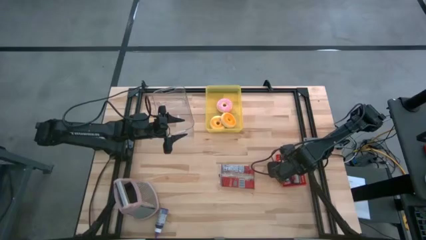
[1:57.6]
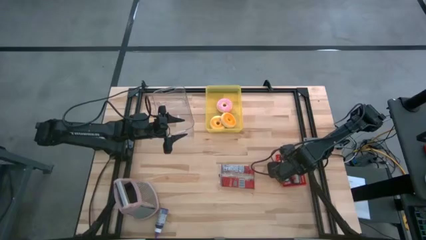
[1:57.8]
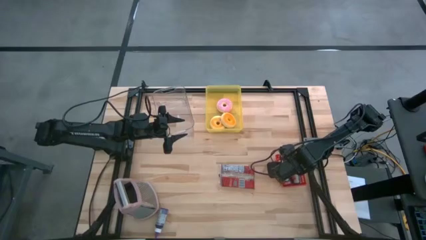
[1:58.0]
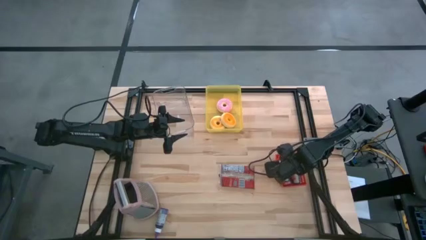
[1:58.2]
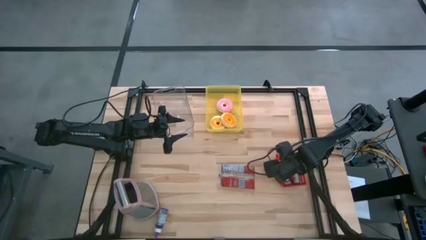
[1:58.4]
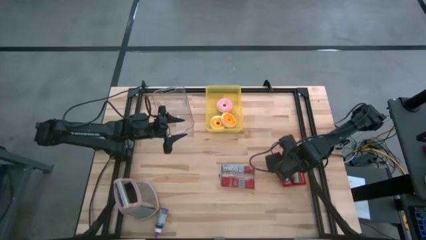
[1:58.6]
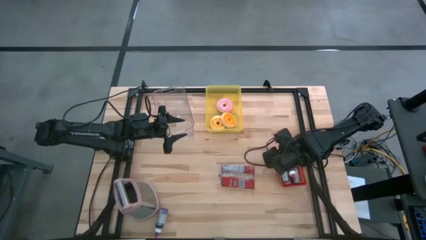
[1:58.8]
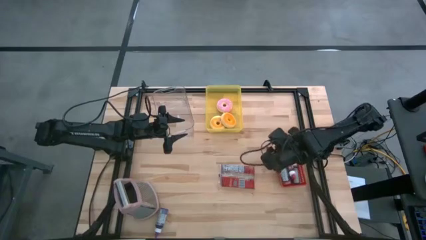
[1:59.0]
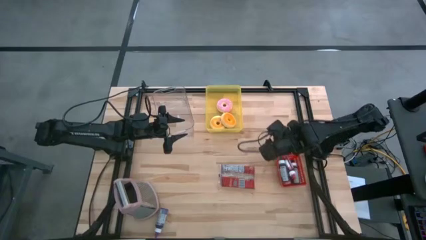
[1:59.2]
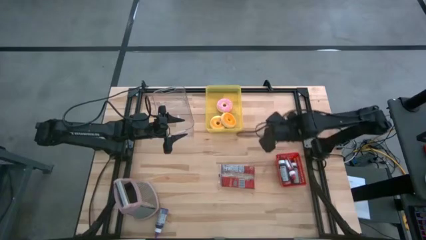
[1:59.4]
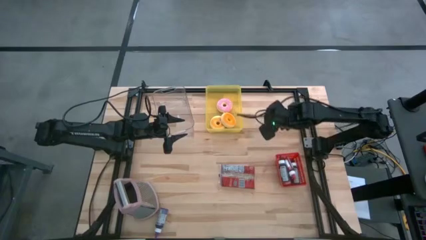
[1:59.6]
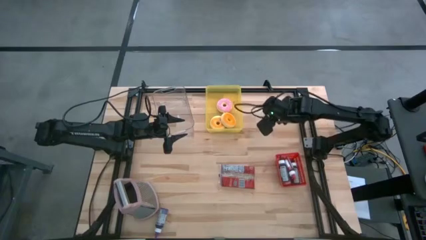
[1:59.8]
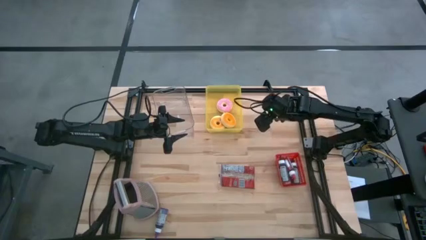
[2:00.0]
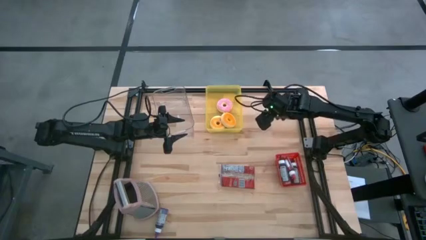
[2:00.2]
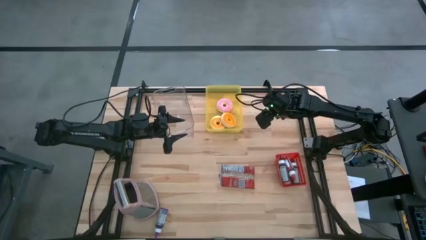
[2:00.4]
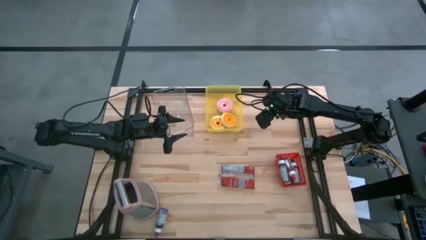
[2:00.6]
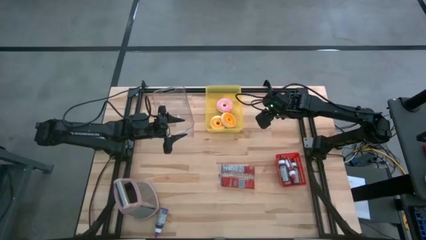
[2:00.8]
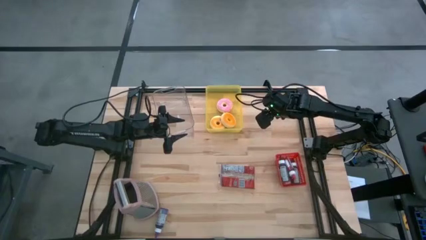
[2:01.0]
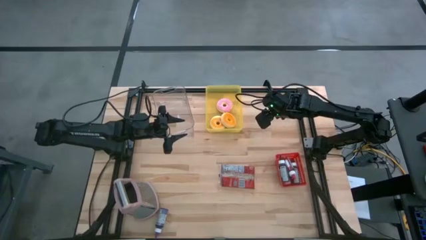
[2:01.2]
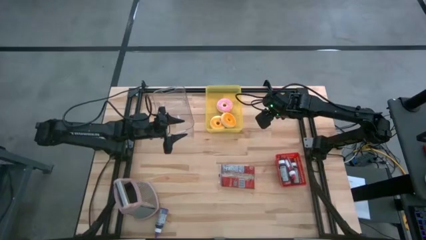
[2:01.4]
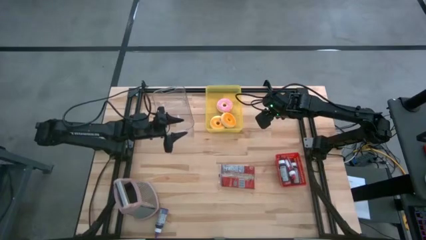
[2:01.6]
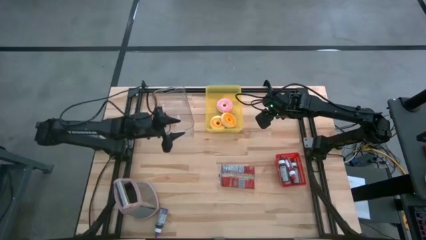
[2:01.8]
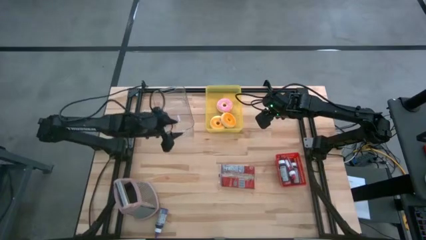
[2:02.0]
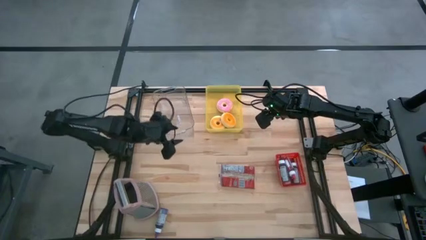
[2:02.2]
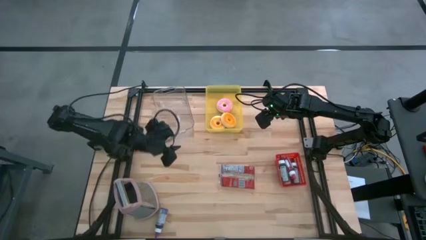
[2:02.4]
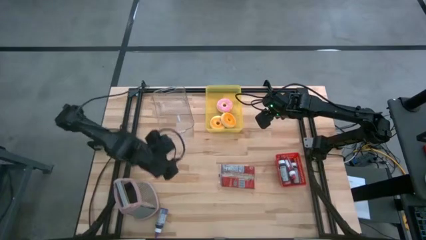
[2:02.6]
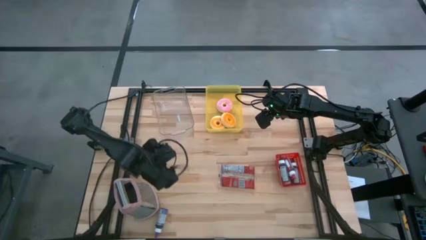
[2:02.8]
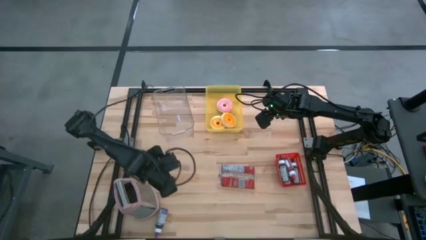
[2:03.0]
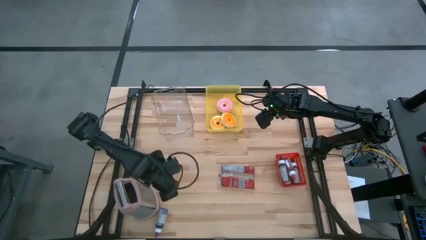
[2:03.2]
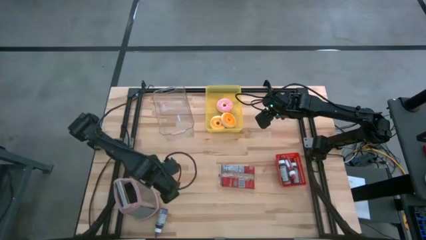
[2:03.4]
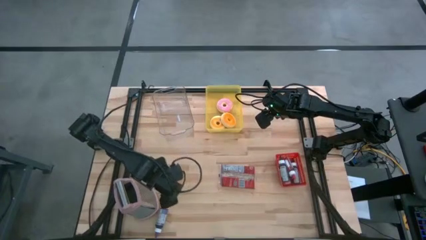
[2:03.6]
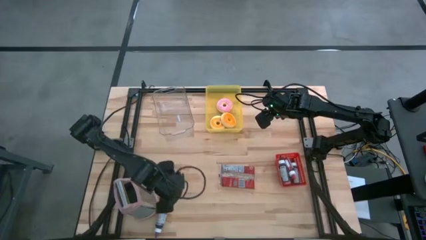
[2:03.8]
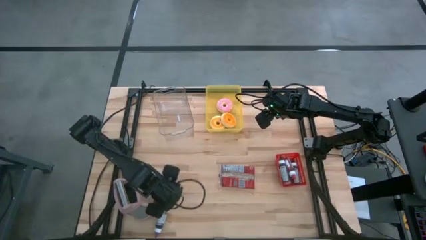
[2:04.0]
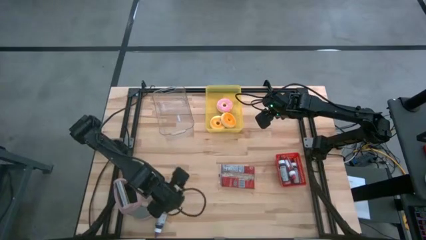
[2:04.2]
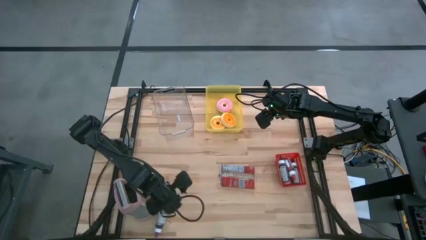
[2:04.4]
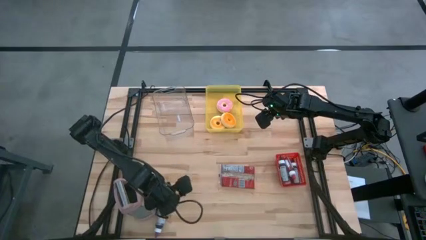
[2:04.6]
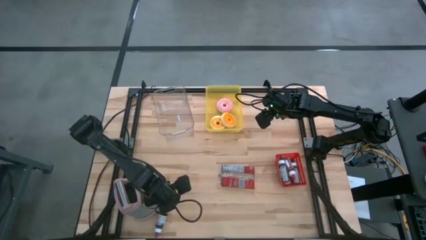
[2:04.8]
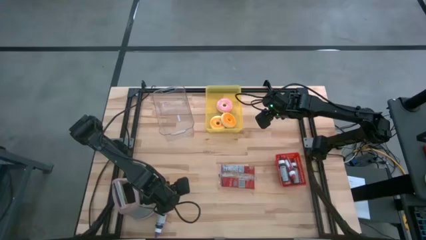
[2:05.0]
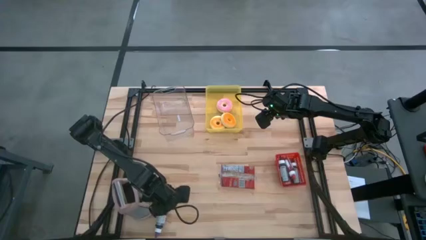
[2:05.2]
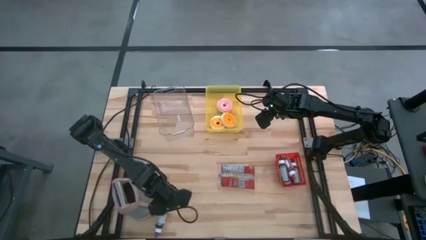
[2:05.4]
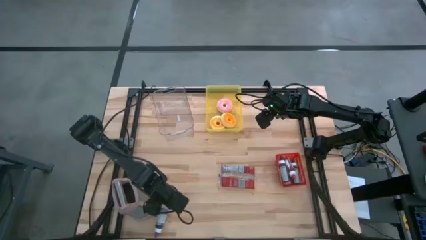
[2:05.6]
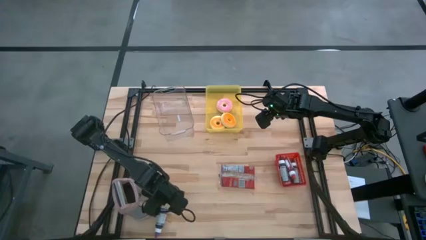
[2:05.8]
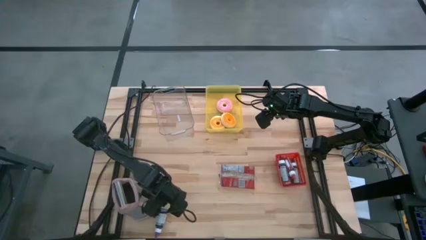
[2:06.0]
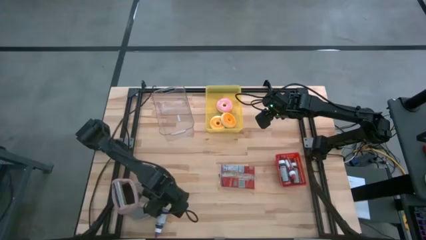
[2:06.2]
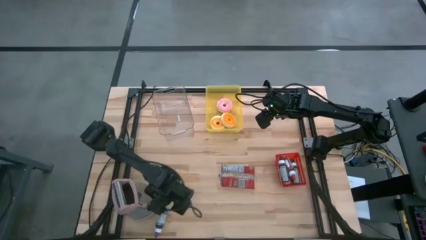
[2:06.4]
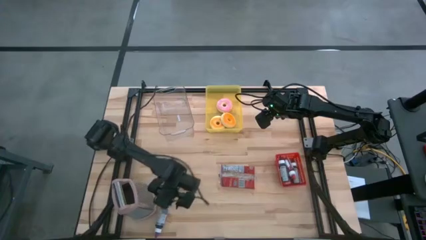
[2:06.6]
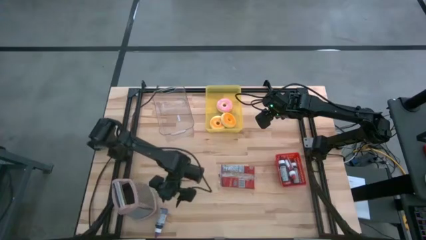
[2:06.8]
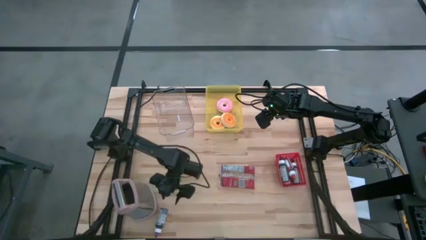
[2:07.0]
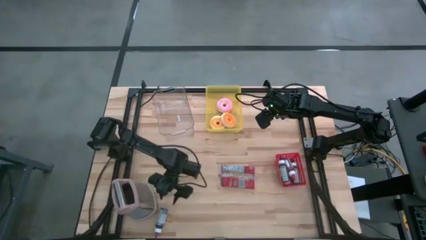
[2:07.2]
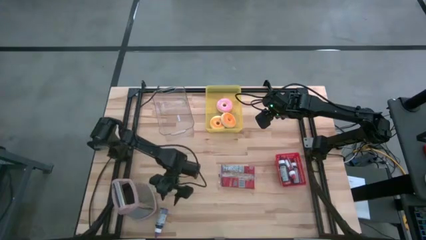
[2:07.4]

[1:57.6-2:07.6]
Task: Pick & Place Food Item
Put the violet food coloring bottle into the red bin

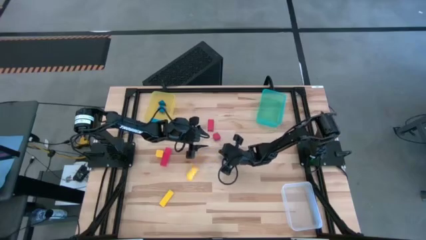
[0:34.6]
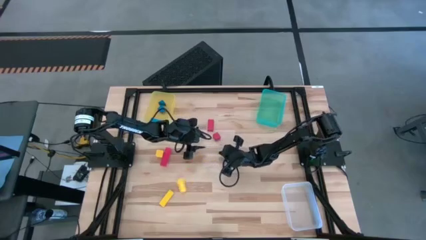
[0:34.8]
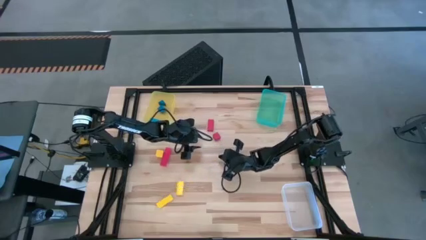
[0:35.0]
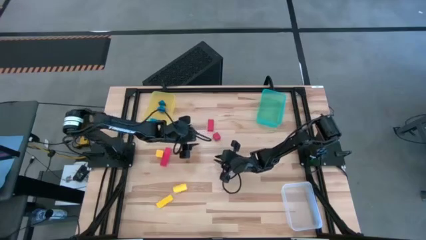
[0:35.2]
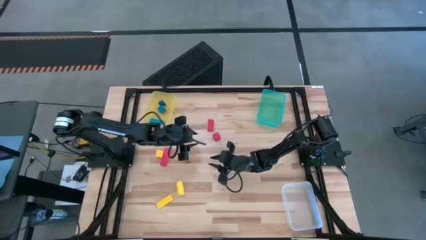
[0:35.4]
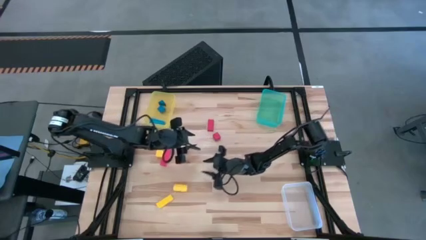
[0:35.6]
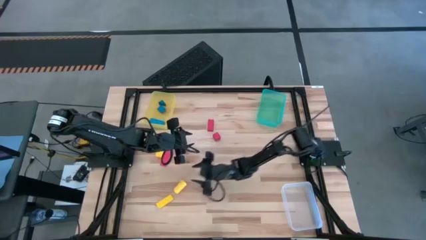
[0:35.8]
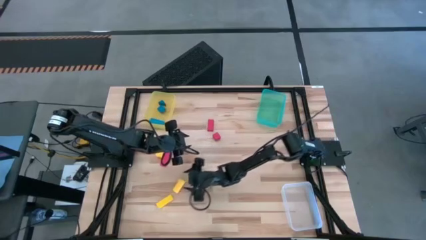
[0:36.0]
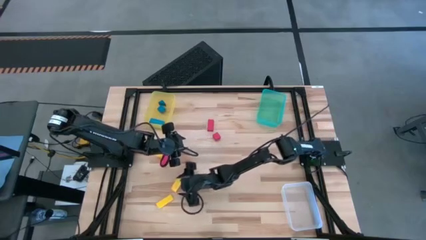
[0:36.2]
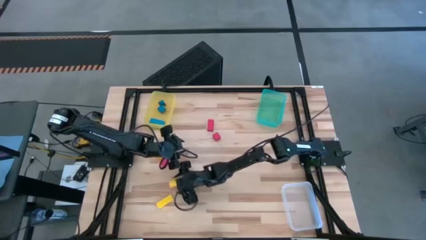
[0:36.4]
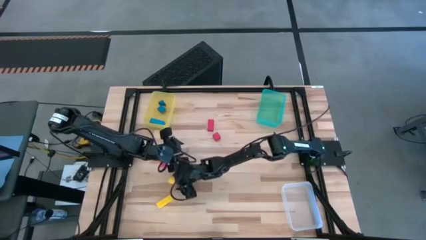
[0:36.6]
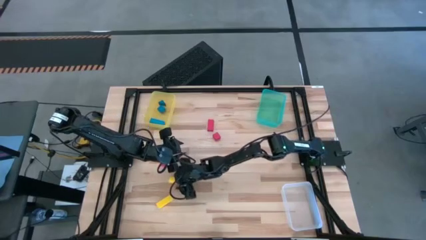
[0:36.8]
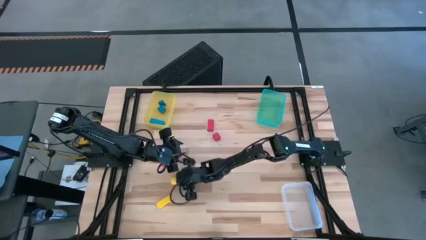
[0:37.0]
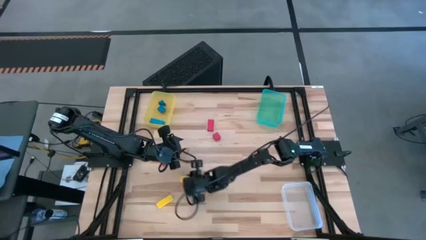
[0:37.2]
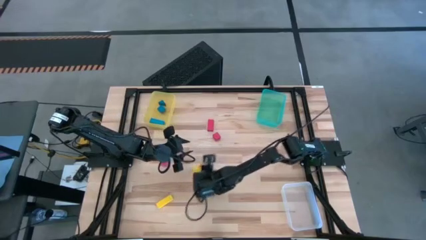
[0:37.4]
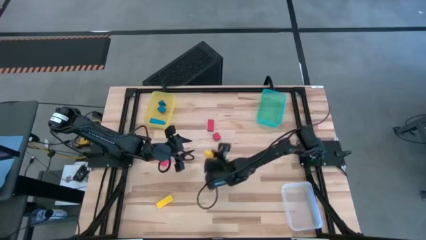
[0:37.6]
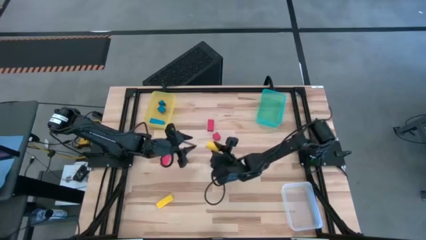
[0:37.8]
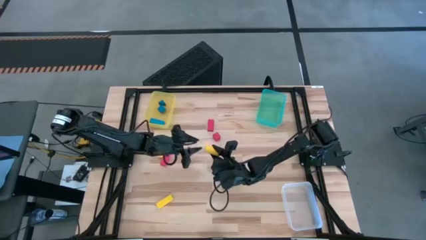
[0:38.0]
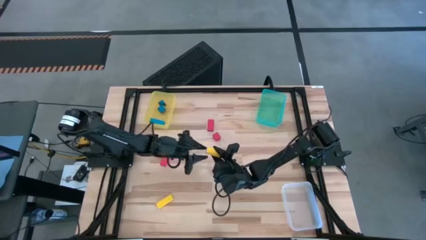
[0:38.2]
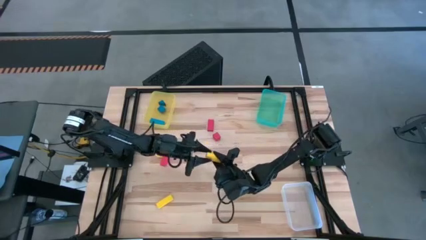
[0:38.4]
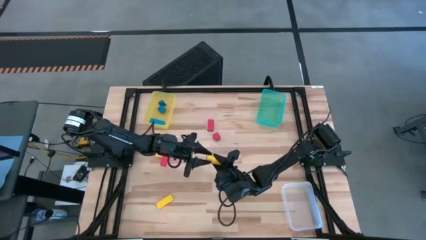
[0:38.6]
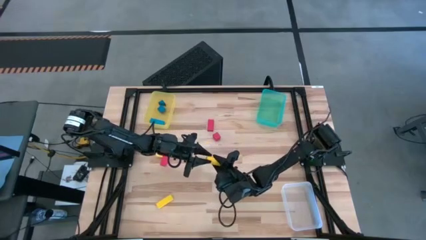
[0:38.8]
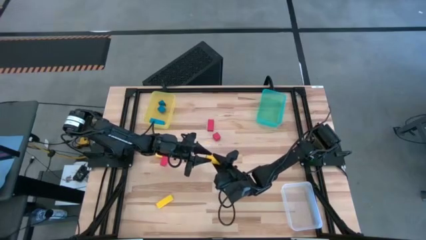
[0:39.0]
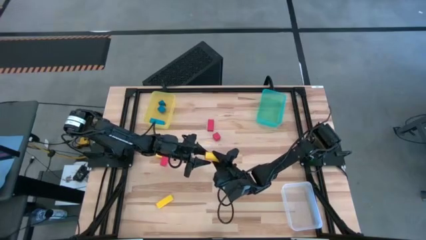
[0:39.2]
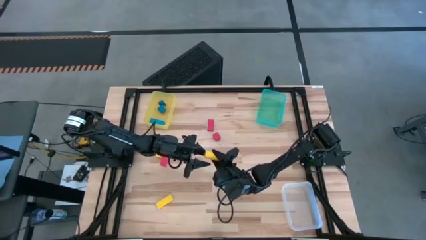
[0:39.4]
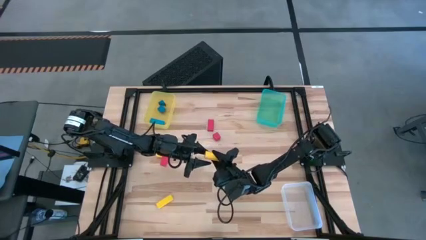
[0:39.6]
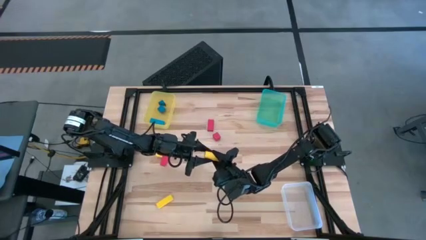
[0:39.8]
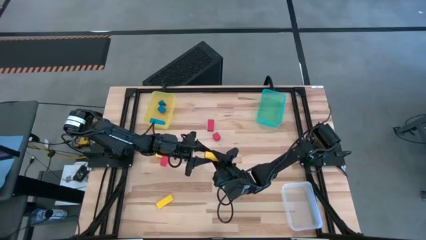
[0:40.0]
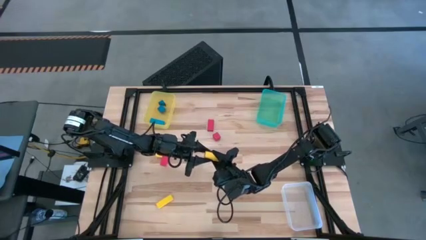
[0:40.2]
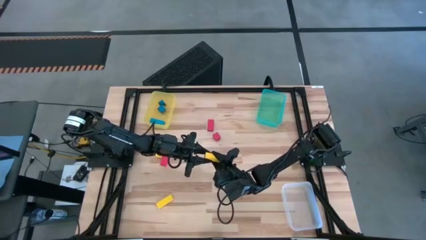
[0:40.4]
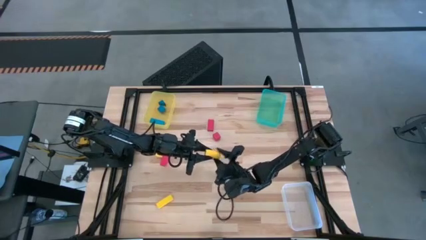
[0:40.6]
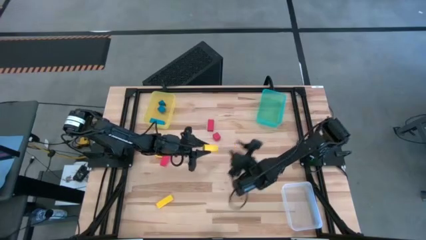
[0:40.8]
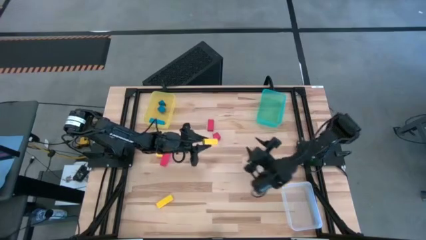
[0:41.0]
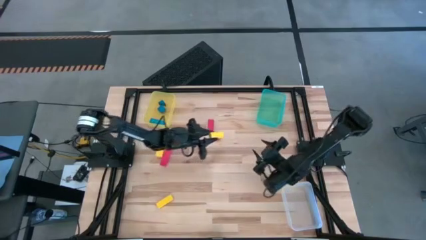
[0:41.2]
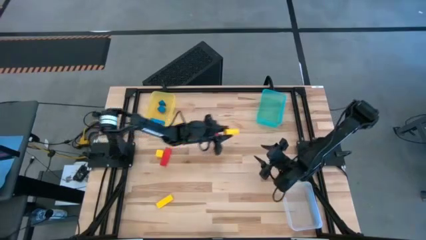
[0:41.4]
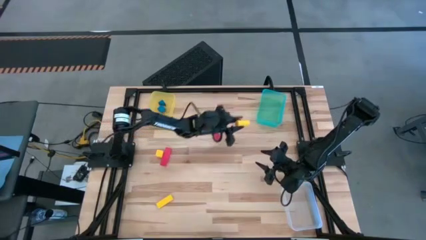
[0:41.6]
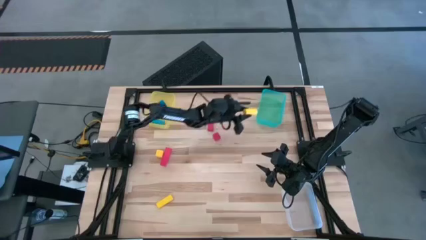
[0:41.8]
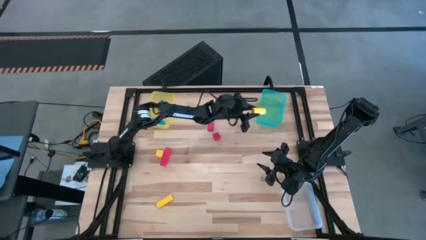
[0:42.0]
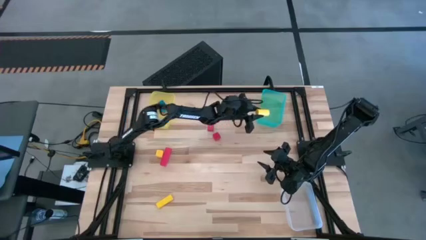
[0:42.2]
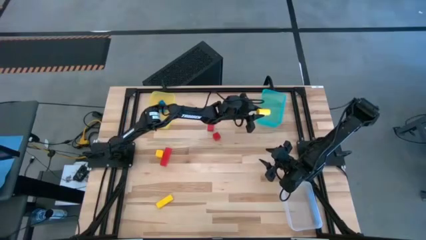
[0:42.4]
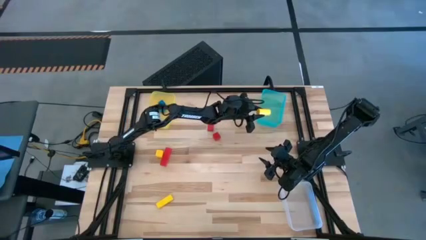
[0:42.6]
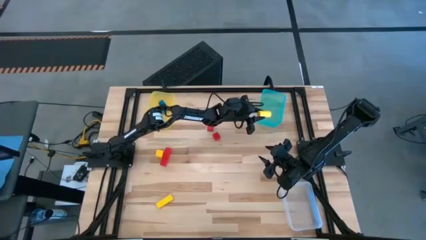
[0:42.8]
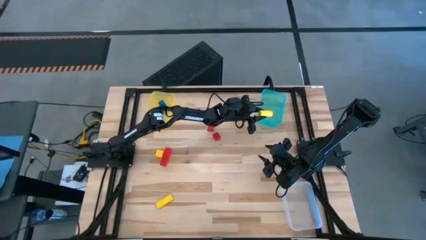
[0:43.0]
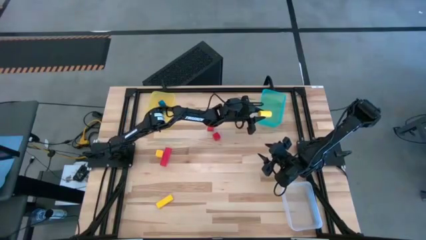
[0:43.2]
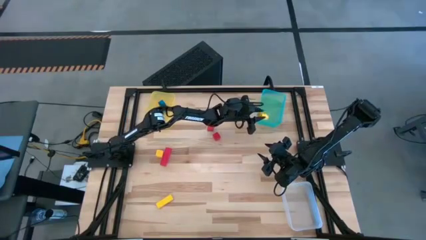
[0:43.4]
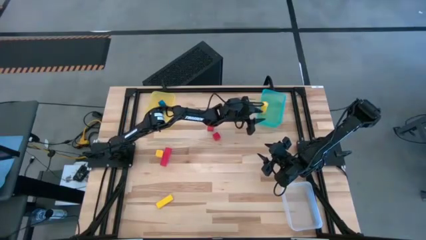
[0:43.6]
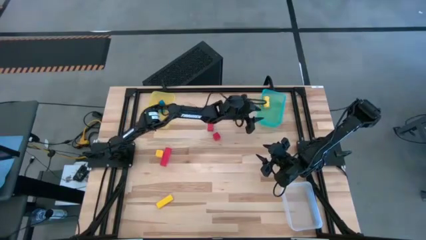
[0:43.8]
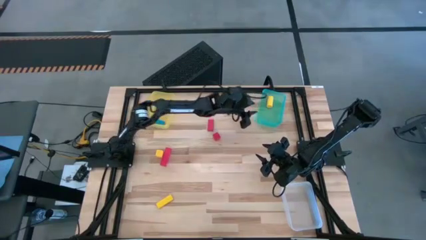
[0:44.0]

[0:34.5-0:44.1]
Task: Sort & place blocks by color
Put yellow cylindrical block into the light blue bin
